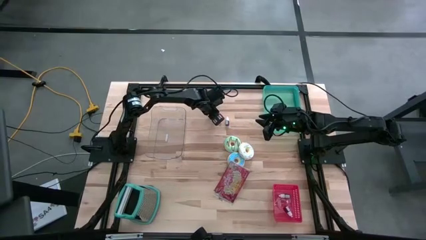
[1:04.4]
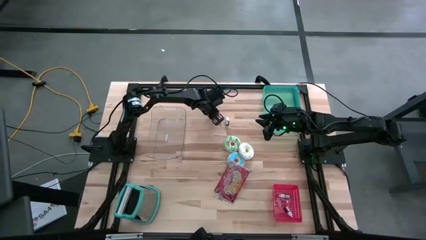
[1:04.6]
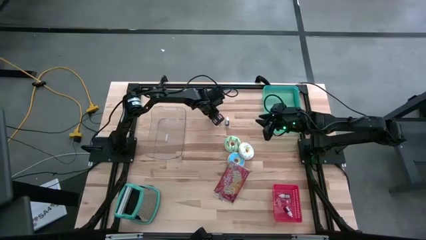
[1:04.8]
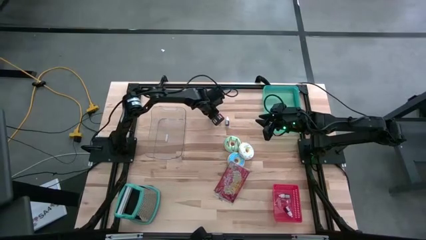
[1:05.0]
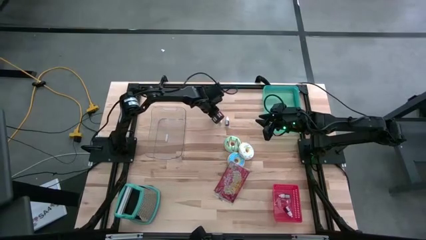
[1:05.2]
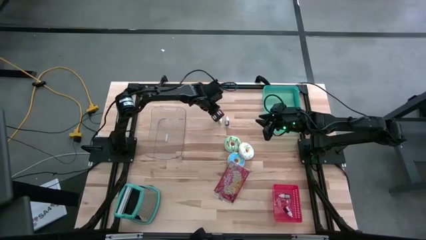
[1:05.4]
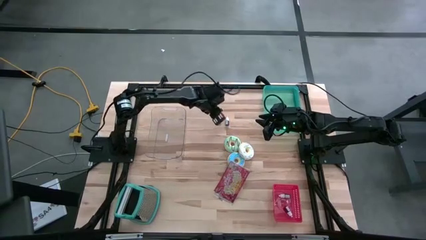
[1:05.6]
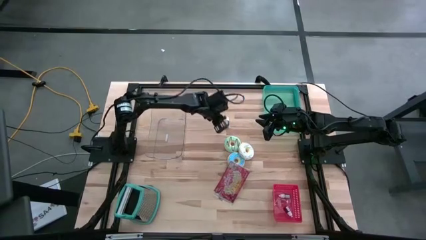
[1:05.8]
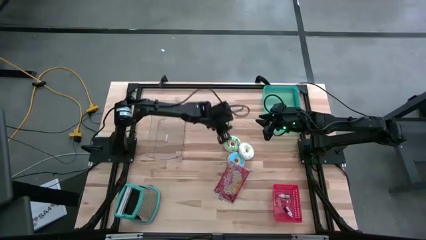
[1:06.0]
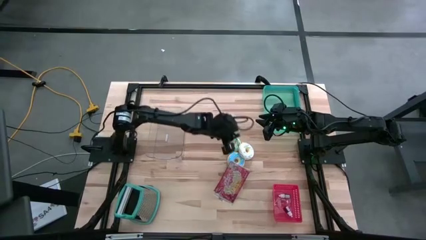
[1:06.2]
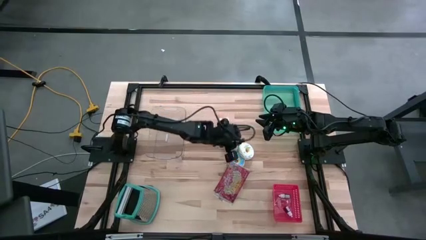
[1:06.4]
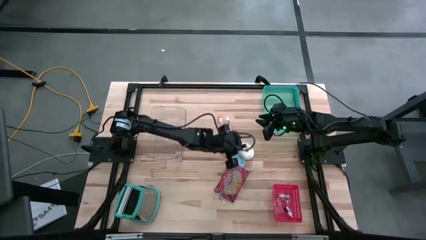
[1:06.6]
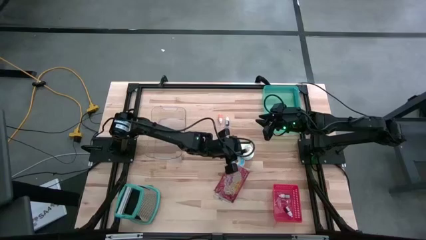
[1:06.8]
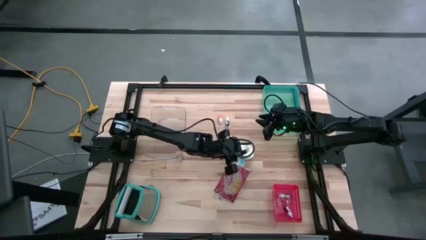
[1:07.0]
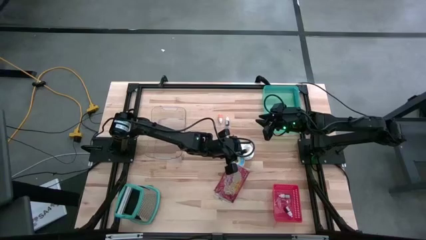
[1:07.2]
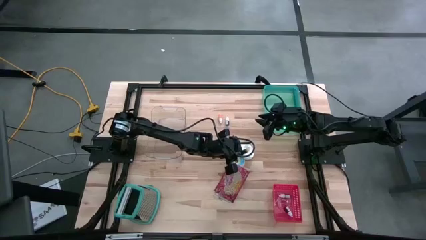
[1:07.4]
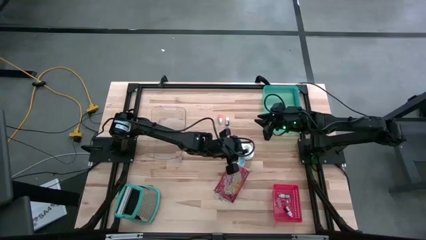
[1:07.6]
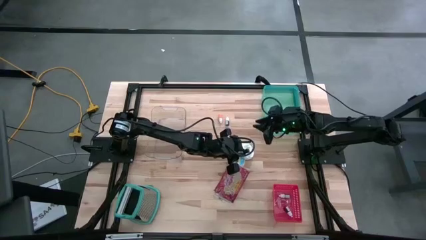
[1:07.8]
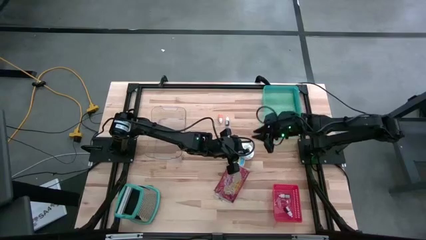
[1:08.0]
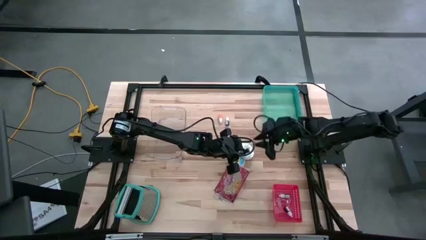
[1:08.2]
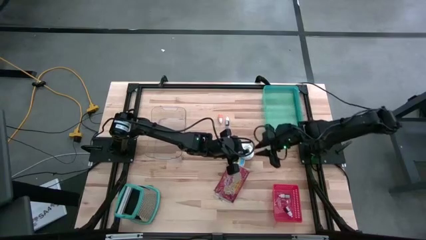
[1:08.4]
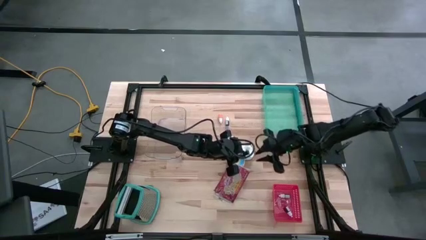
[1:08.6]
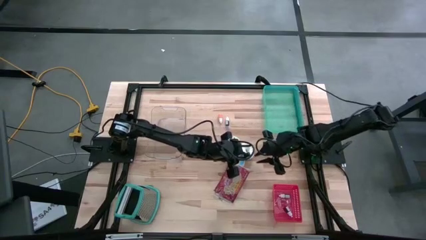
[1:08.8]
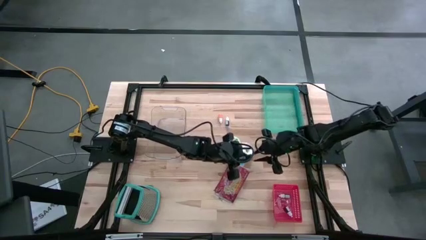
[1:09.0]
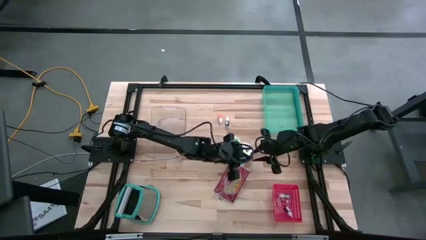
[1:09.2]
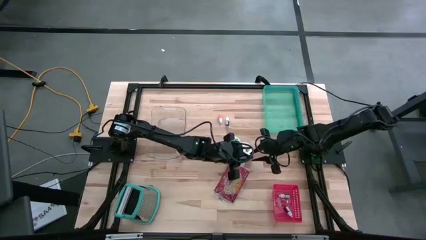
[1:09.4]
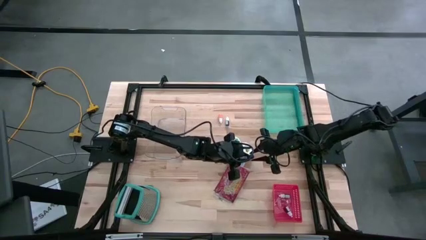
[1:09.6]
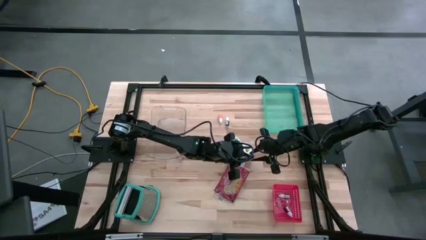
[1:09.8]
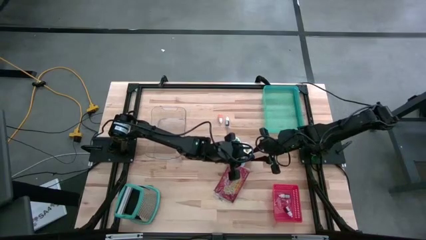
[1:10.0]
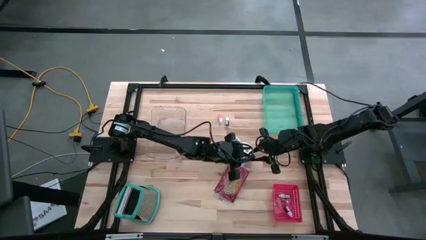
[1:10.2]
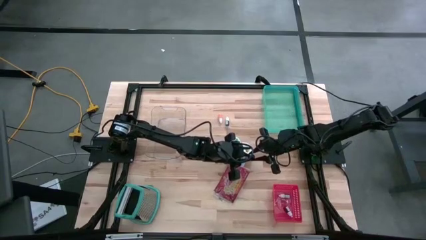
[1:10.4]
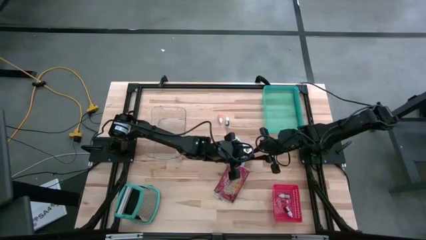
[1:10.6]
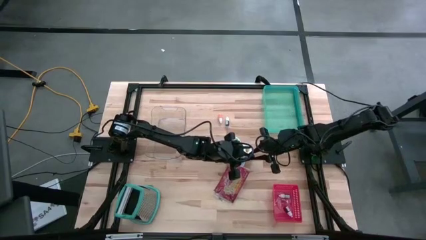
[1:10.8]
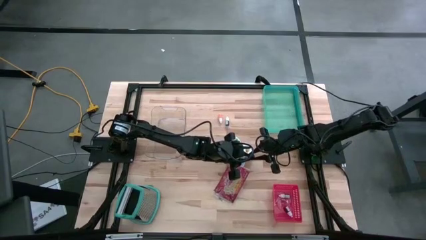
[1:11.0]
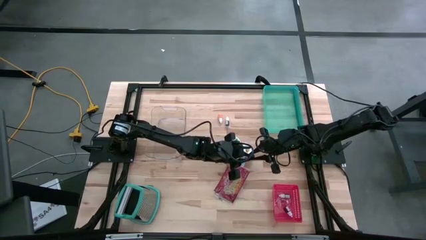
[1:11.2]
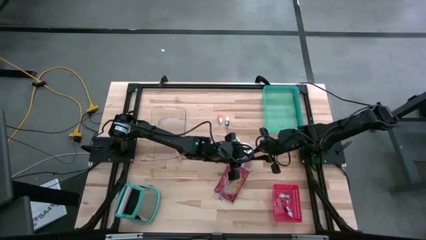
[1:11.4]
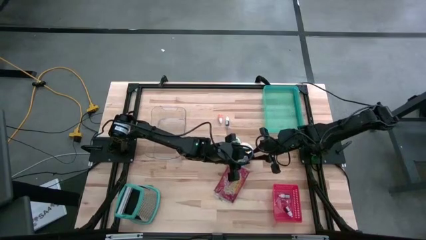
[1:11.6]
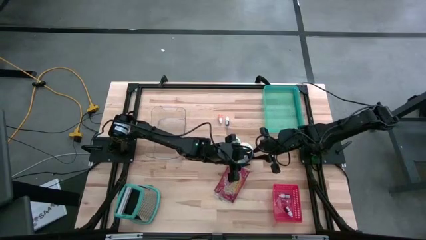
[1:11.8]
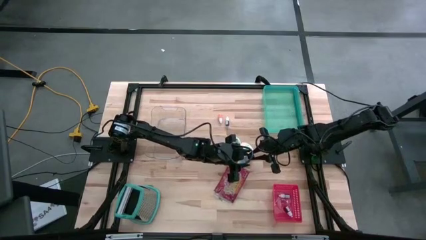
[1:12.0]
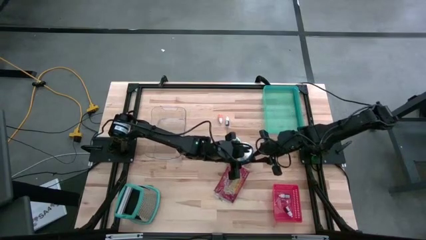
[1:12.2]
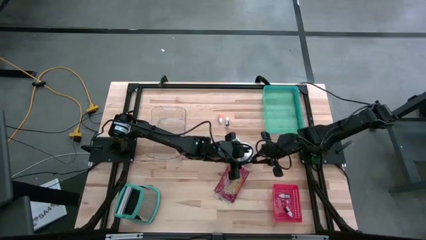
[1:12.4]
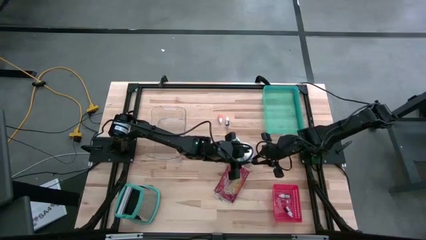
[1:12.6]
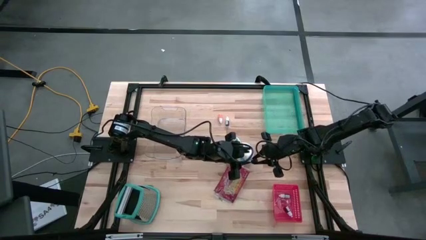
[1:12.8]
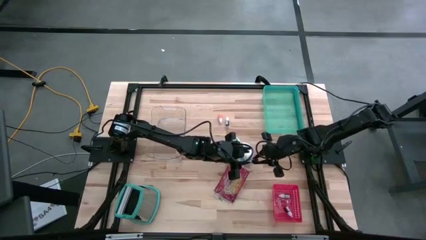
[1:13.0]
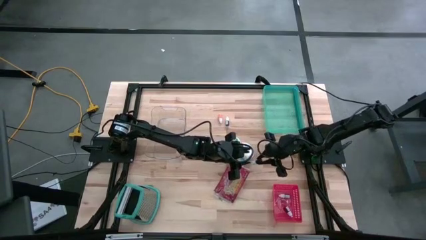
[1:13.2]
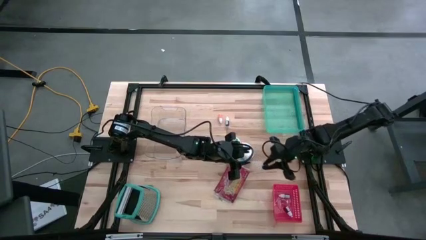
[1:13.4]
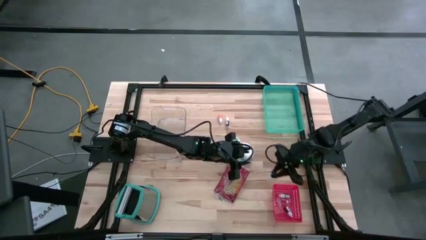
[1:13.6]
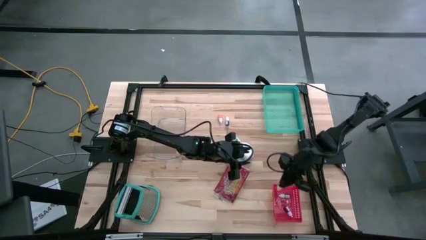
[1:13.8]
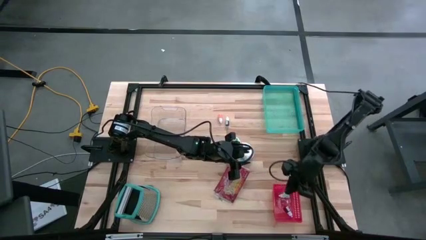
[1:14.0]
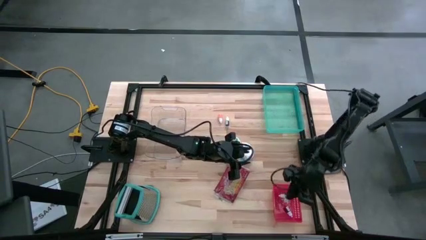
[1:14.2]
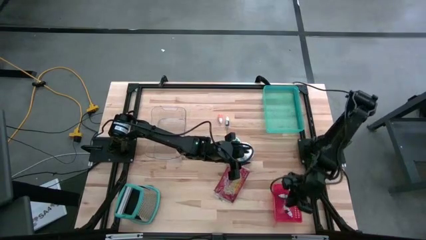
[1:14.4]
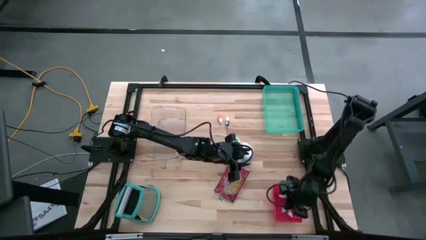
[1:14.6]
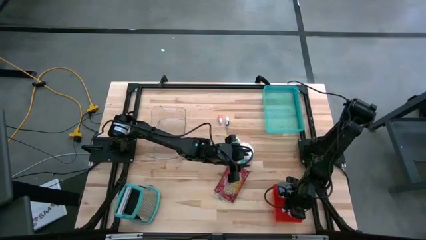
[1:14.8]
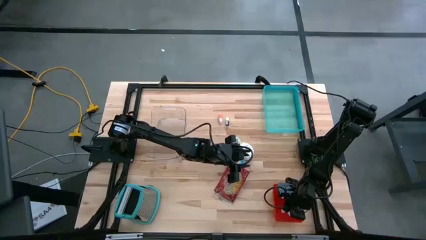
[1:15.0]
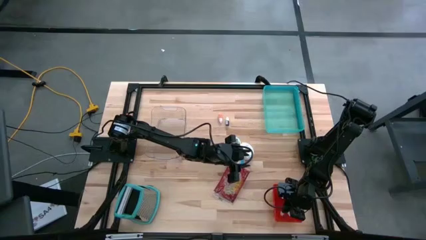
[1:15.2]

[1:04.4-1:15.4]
Put the blue food coloring bottle into the red bin
